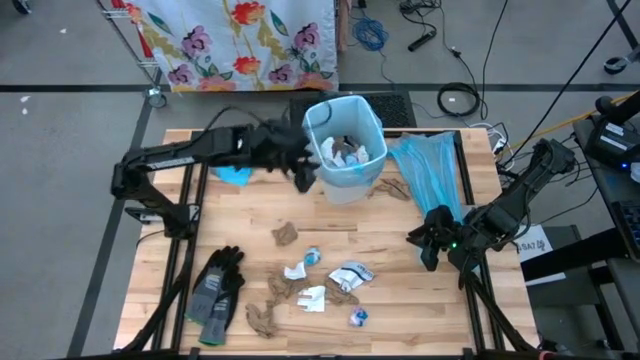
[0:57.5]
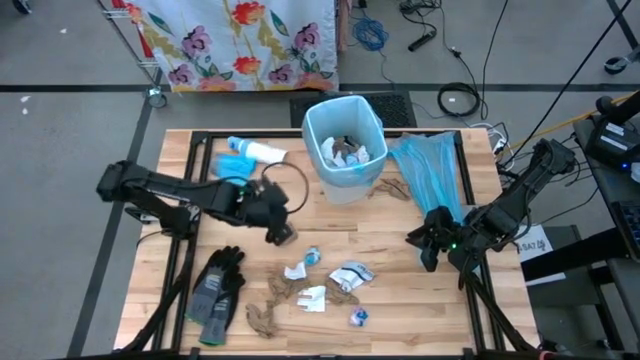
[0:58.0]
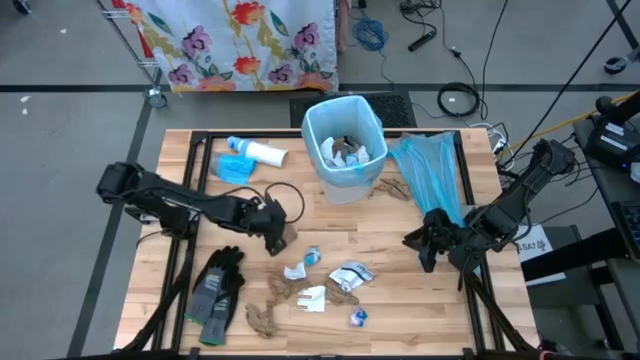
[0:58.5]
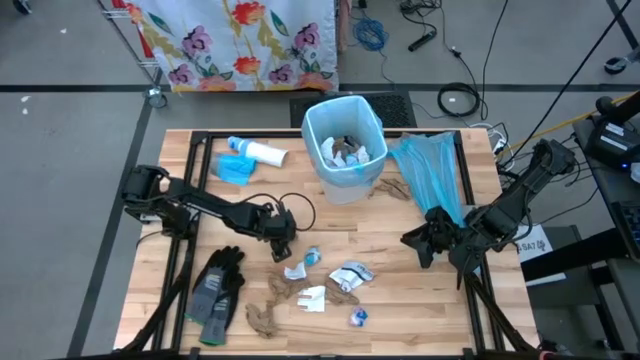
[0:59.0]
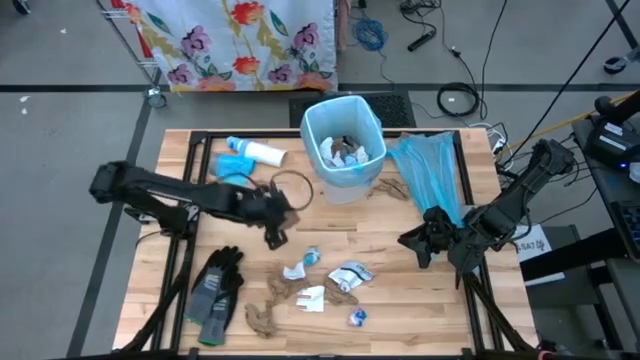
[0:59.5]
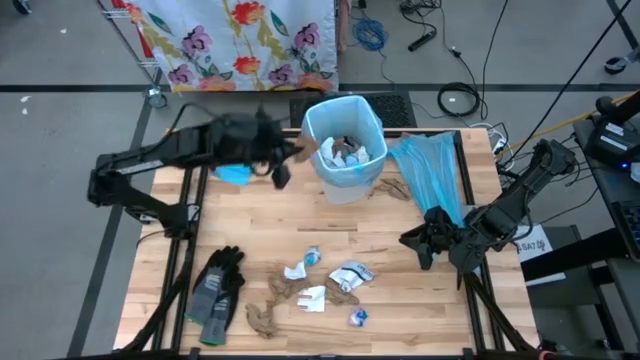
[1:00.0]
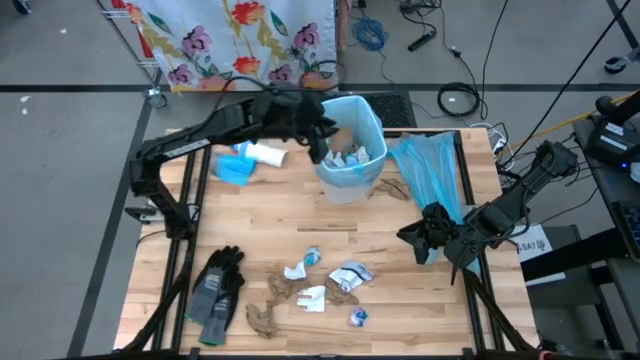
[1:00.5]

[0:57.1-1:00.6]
Task: place trash/remove bag and relplace
Put the brown paper into the trash bin

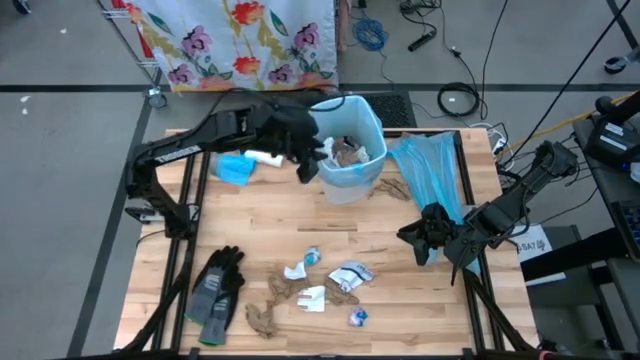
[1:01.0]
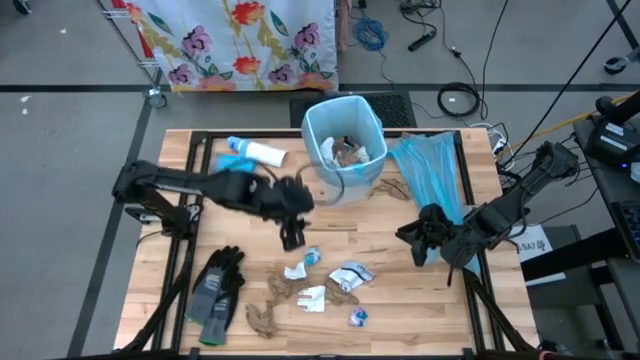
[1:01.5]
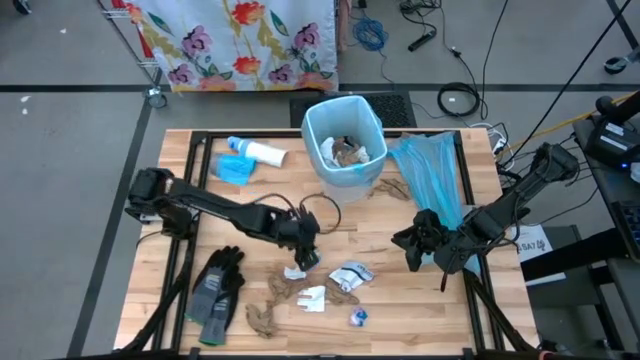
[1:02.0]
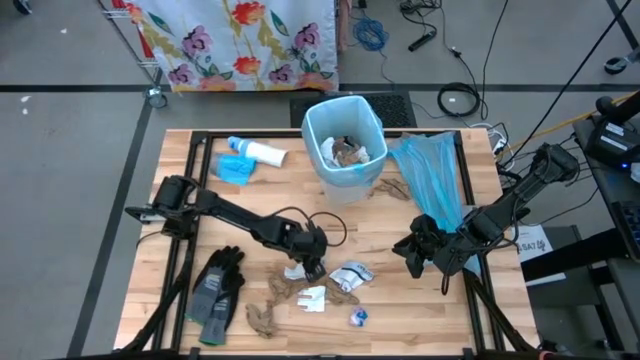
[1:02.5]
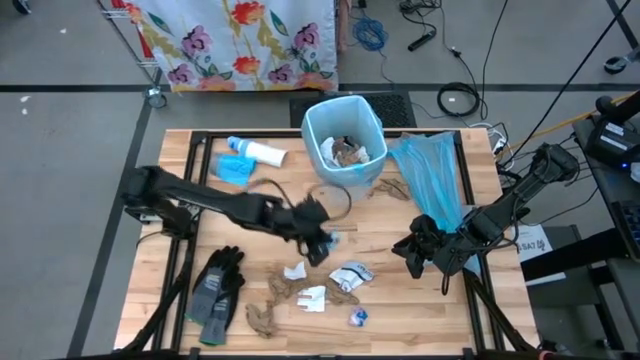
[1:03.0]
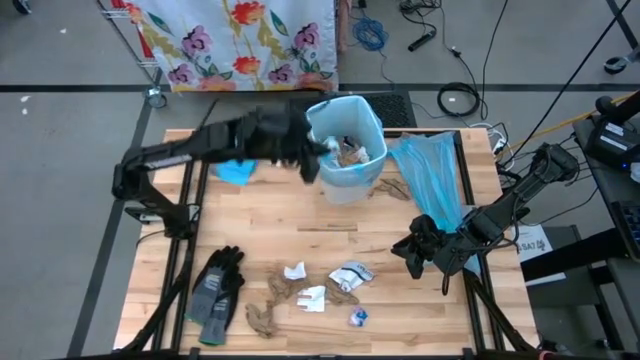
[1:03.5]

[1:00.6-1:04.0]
Put the blue trashbag into the trash bin

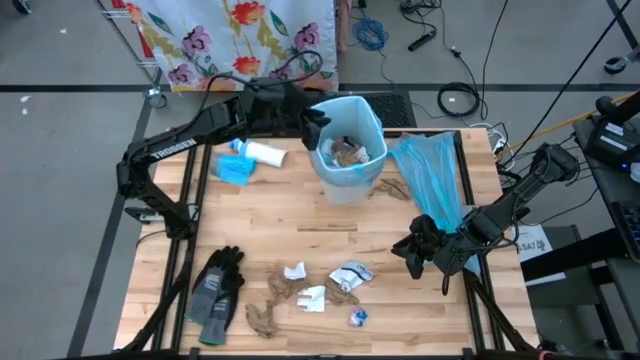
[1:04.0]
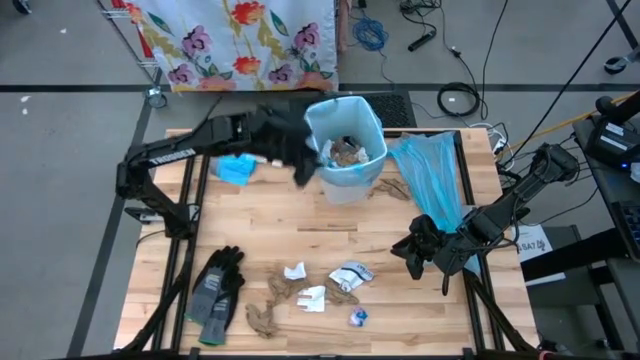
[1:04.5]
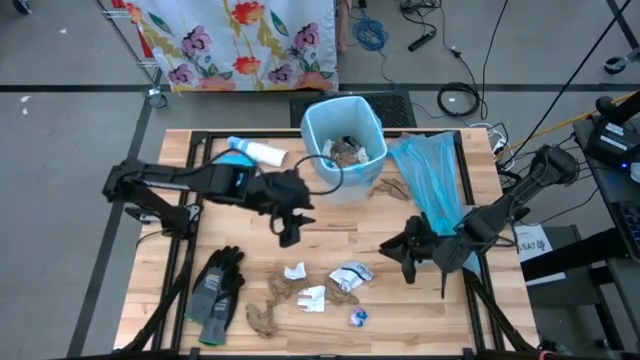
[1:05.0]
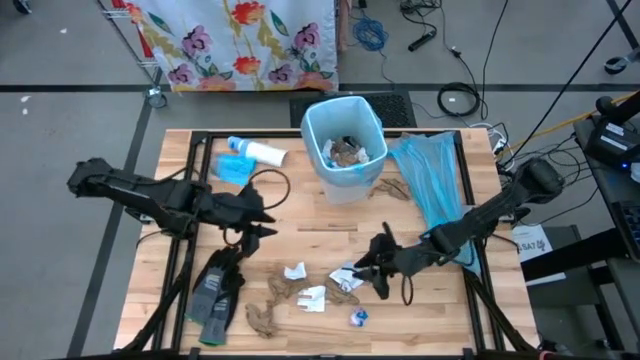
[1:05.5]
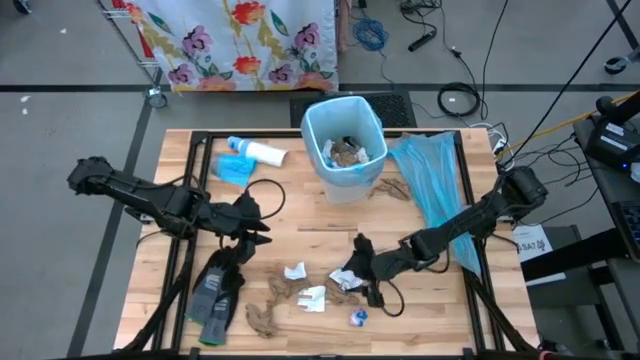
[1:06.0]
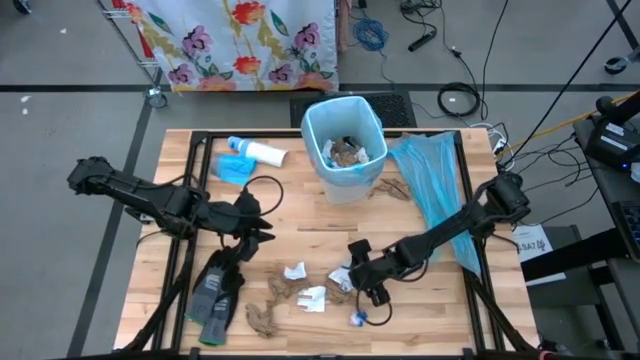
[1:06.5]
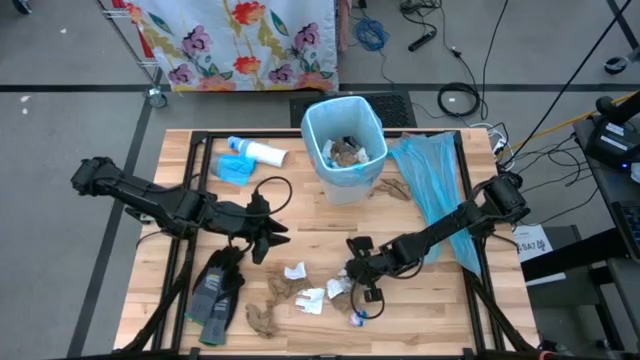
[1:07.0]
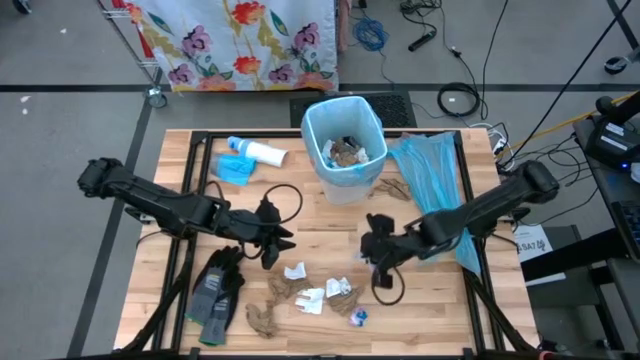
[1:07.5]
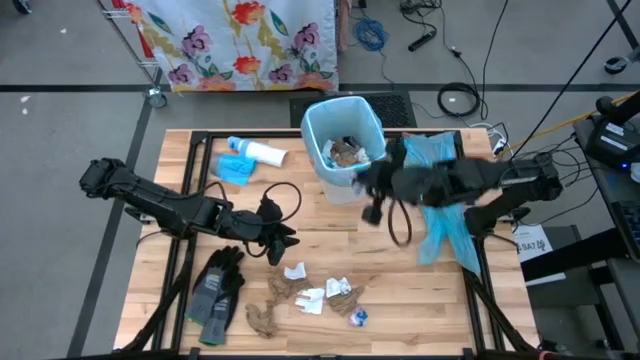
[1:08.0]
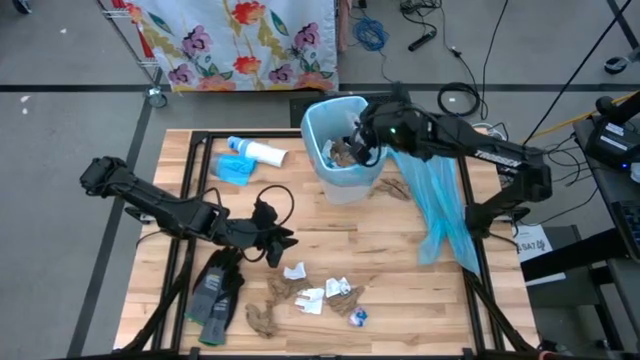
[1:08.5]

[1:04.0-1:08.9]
Put the white paper into the trash bin

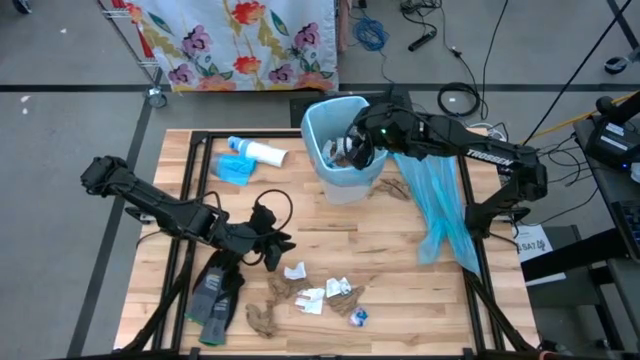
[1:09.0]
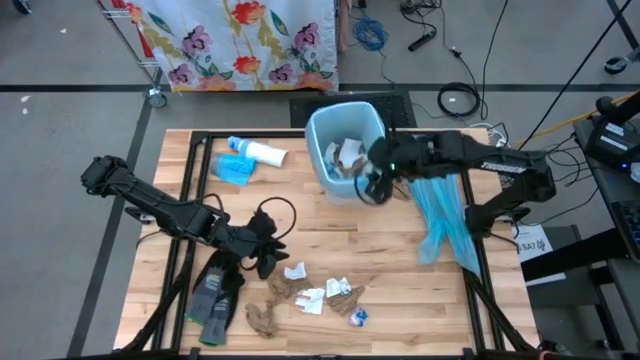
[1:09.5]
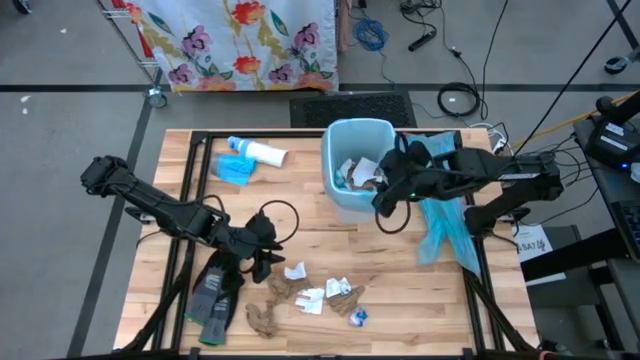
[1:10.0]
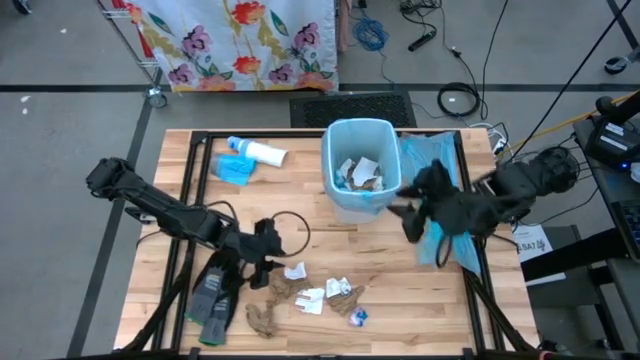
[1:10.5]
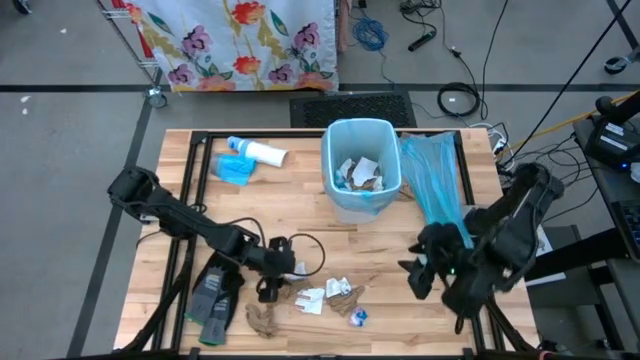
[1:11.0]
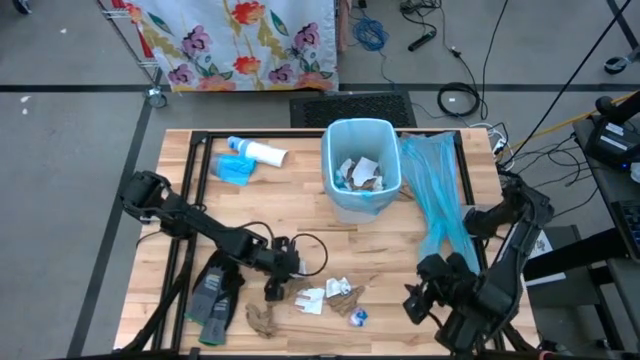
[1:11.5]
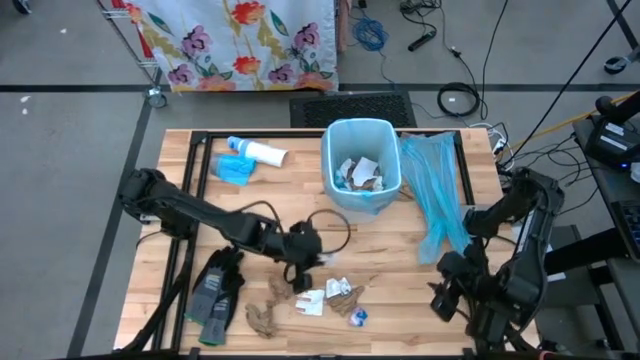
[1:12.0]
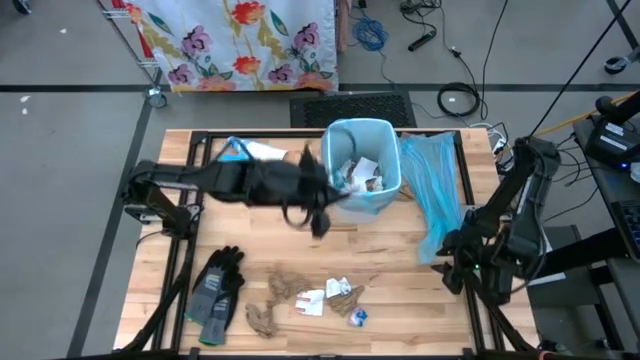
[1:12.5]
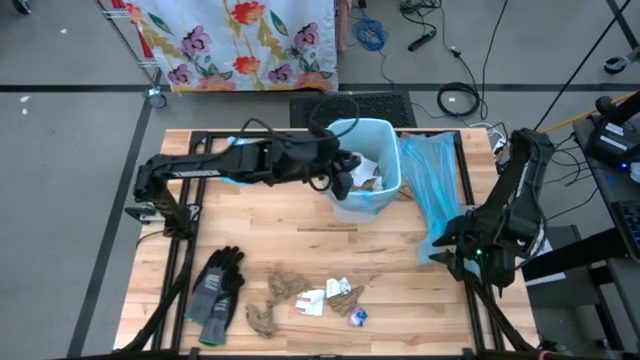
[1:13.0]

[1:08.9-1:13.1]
Put the white paper into the trash bin

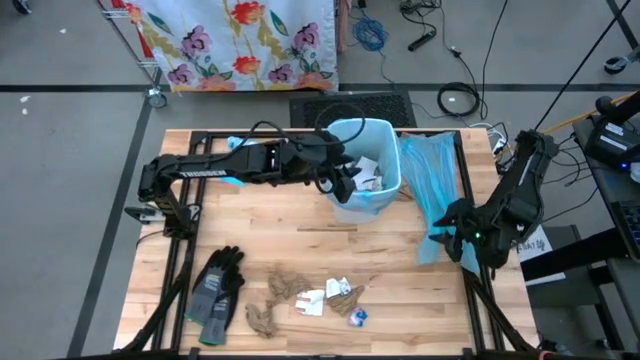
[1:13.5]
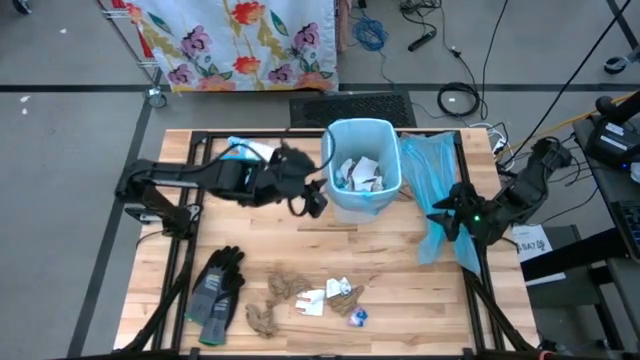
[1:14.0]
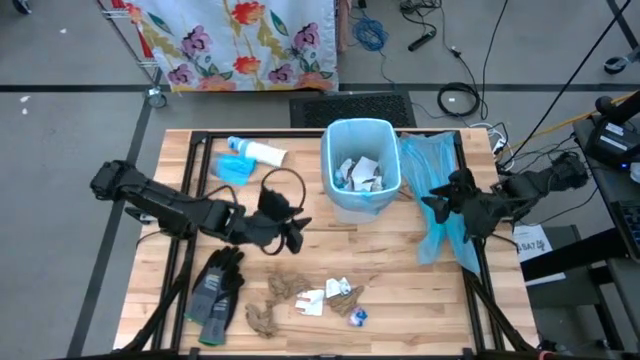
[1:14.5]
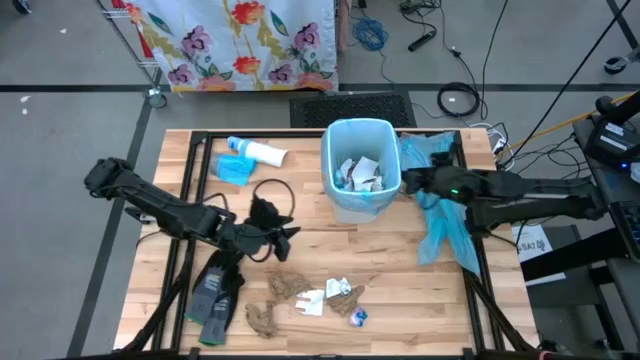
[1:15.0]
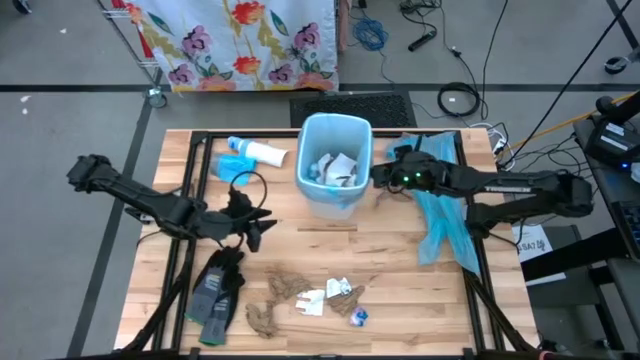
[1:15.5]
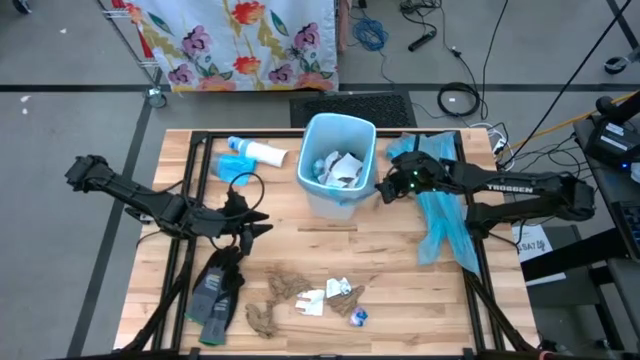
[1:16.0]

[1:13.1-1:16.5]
Adjust the trash bin

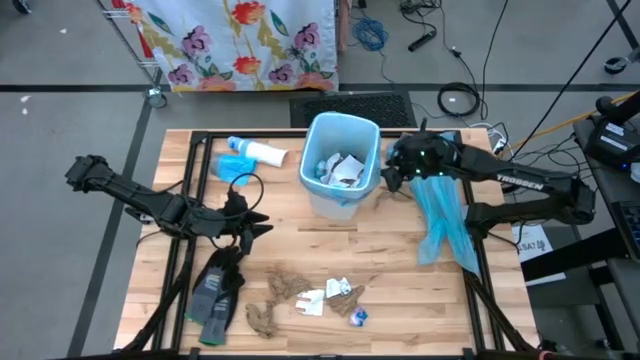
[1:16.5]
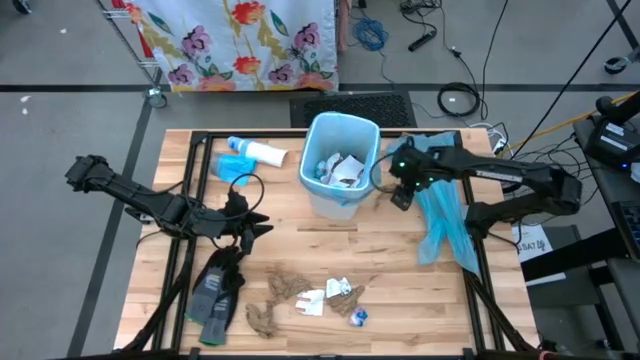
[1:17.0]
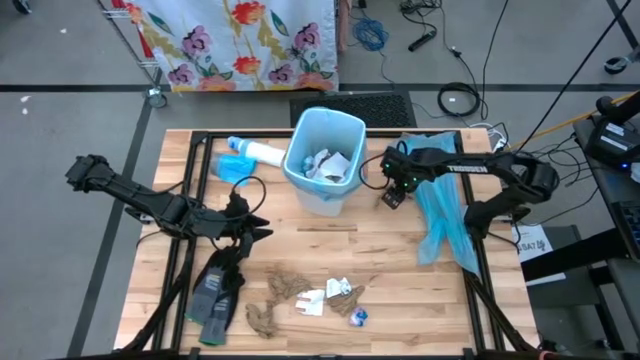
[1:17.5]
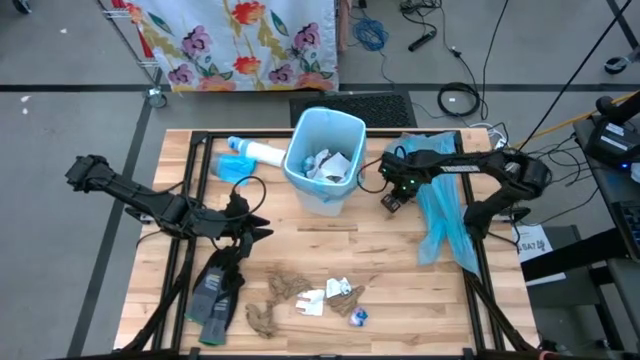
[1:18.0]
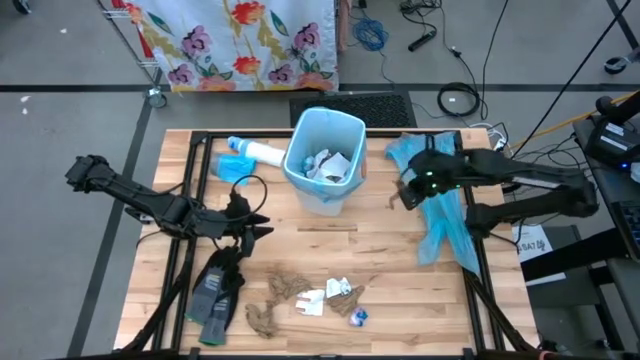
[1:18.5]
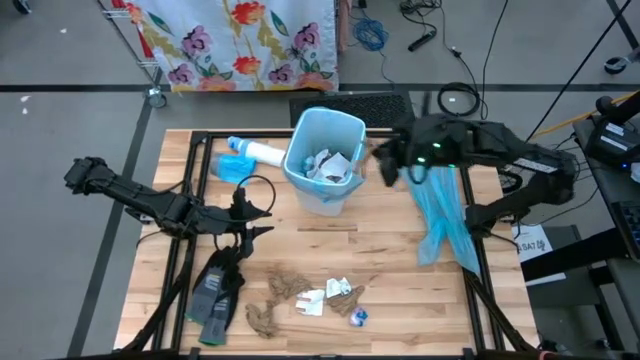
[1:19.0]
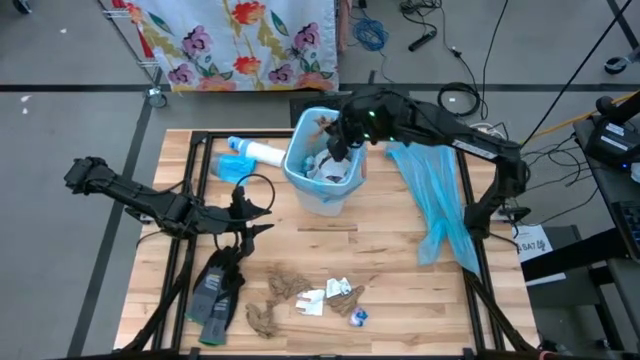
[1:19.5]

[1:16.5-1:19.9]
Put the brown paper into the trash bin
